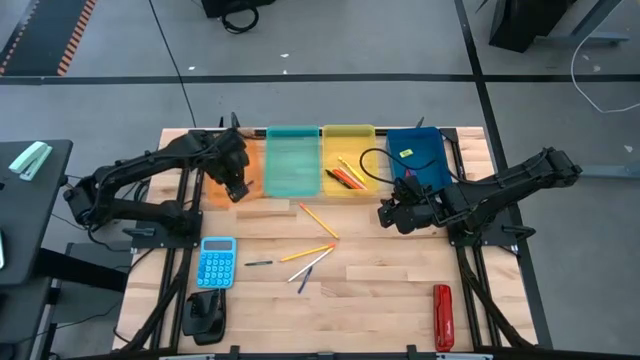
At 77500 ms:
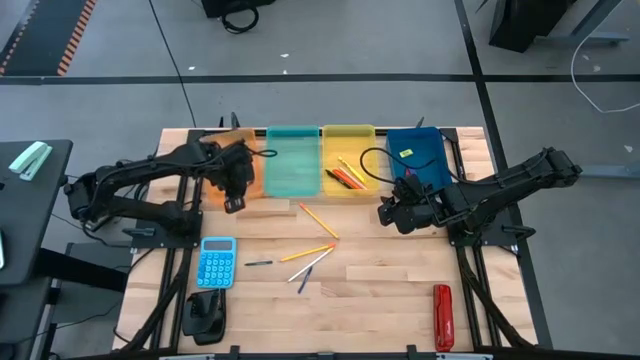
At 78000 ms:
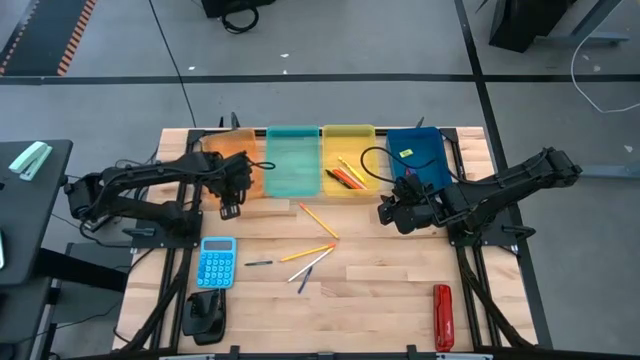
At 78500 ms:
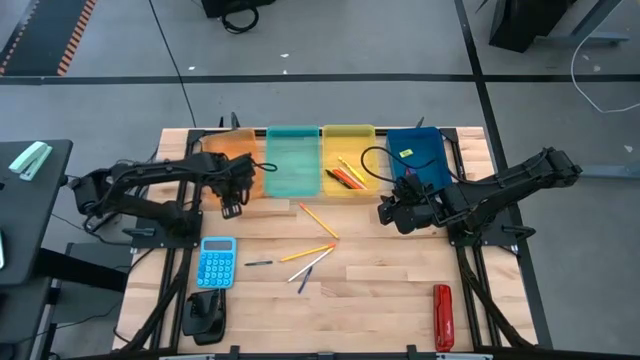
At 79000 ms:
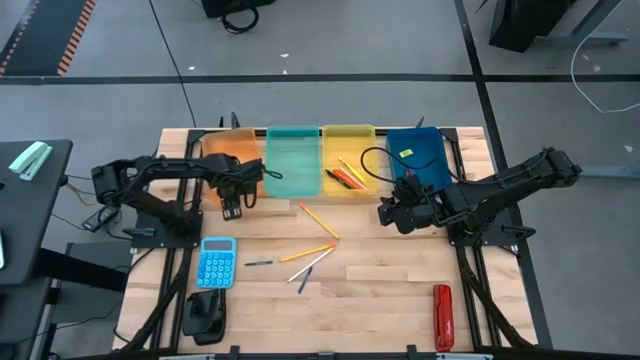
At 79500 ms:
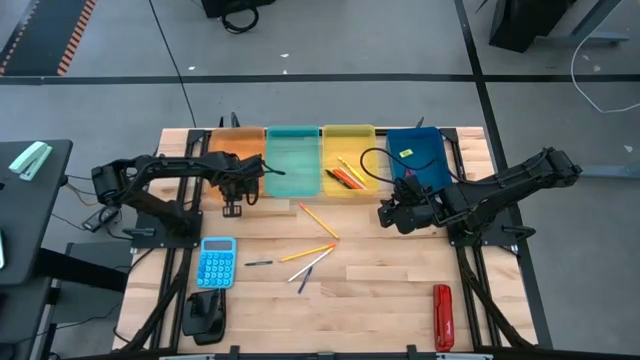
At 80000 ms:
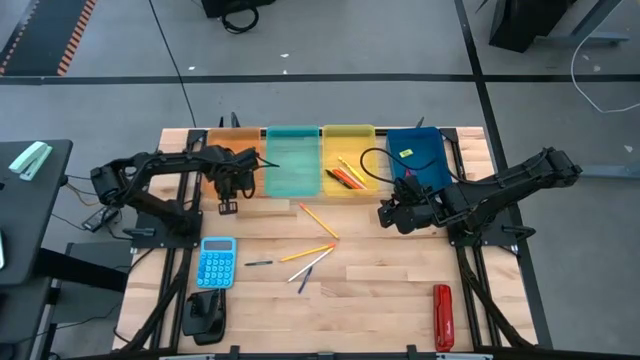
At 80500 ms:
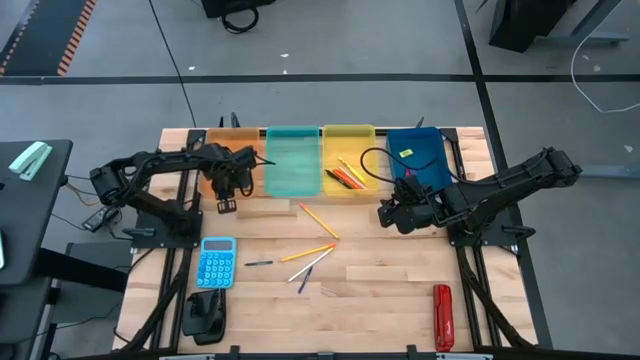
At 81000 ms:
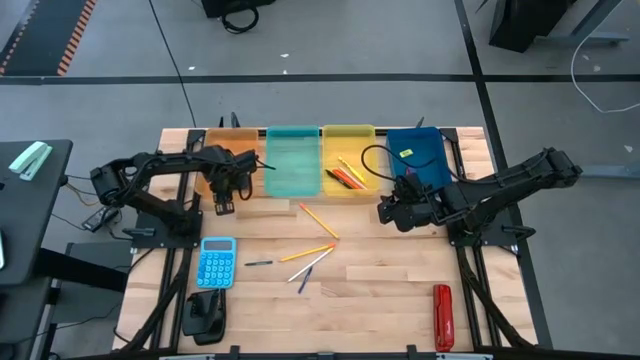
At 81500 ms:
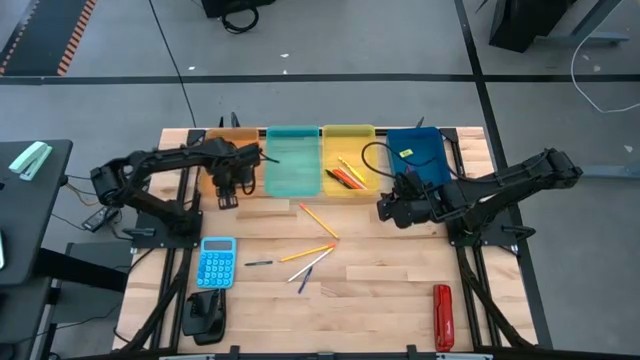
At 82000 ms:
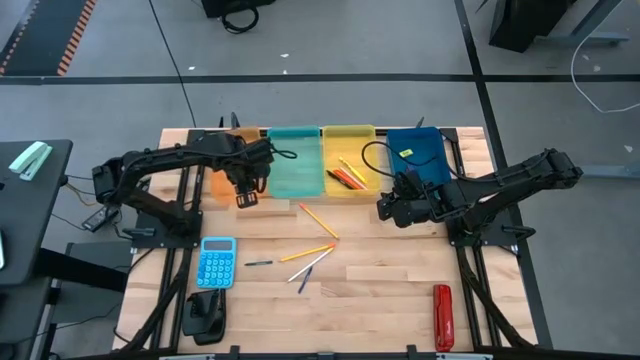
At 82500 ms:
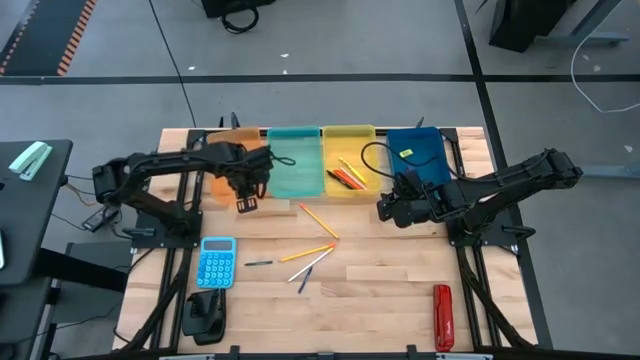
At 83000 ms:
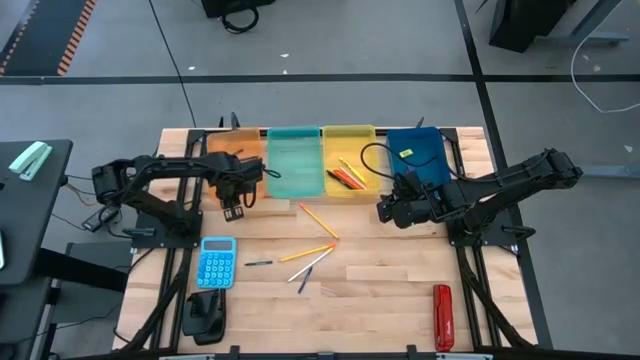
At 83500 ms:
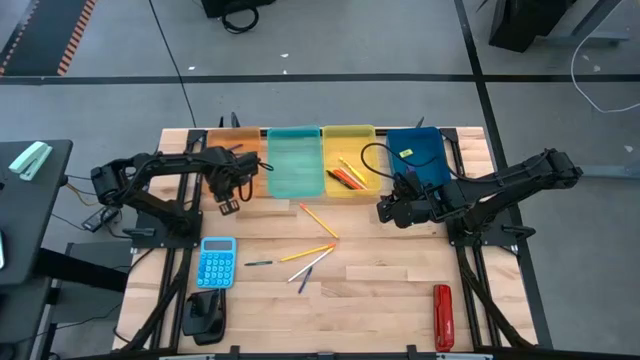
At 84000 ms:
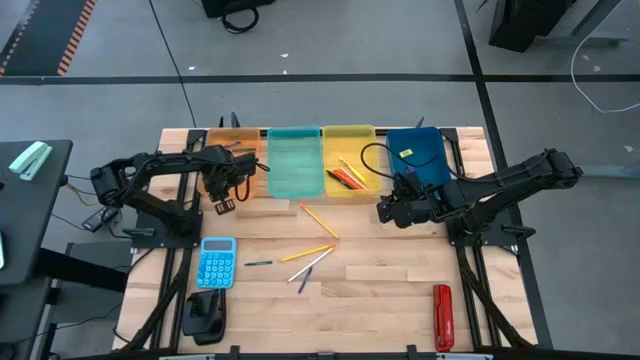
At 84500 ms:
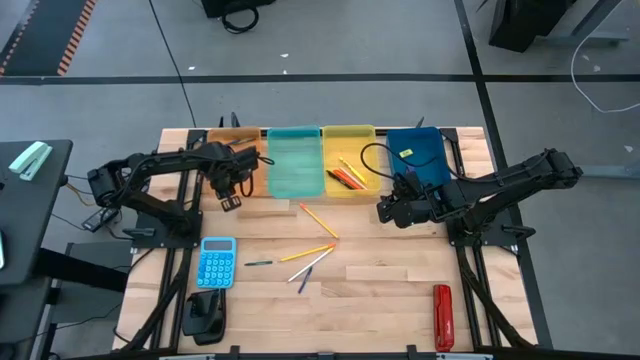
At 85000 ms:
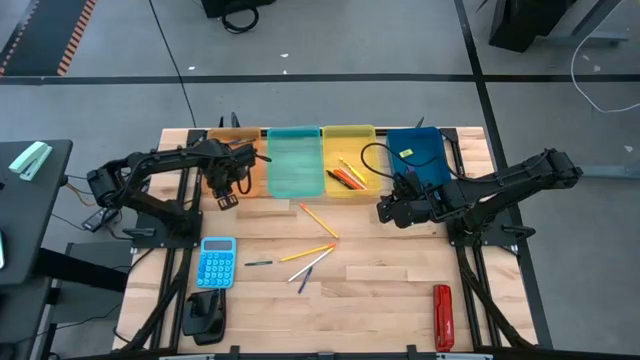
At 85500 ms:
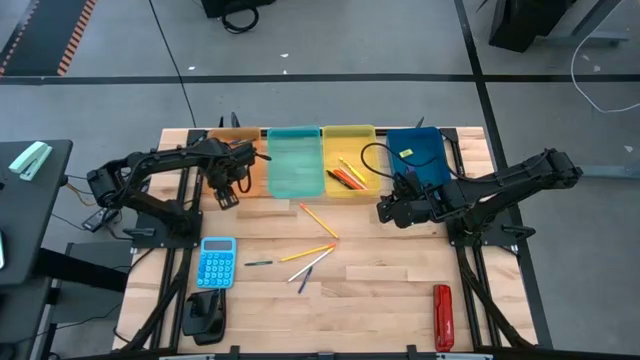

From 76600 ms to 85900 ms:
Task: Sort crayons/erasers/pens/pencils in bins
Adjust the orange bin

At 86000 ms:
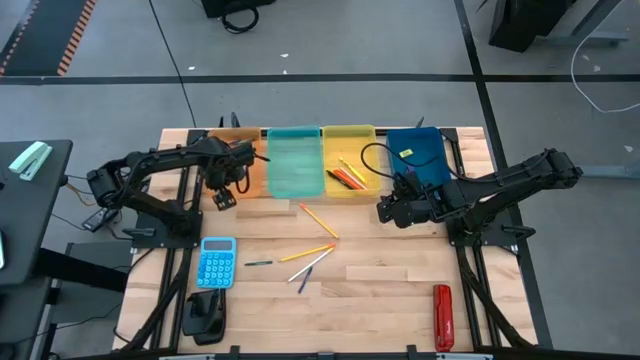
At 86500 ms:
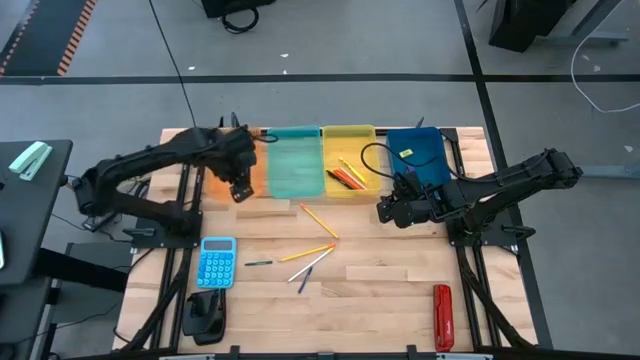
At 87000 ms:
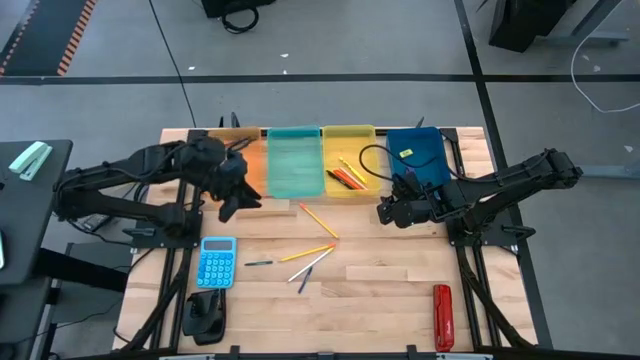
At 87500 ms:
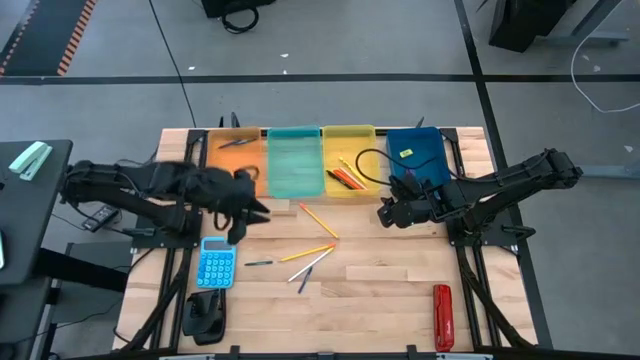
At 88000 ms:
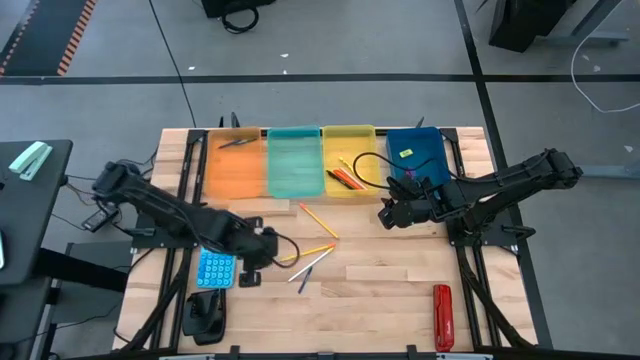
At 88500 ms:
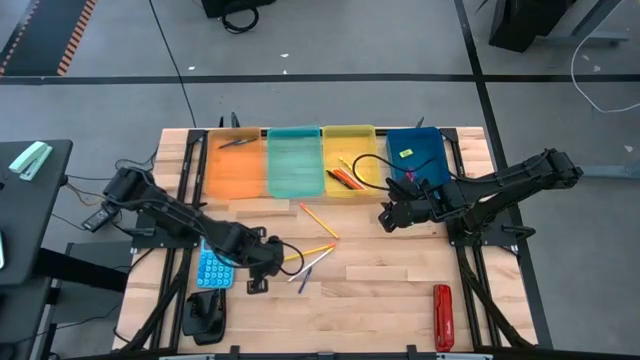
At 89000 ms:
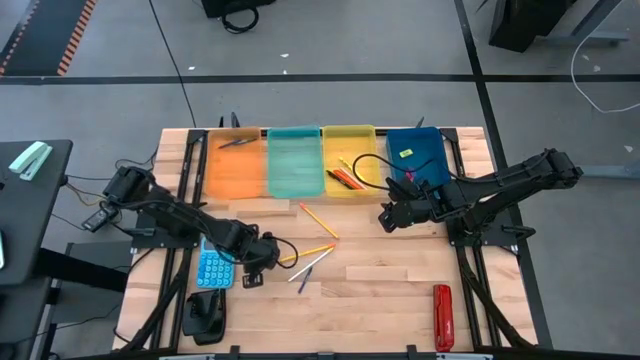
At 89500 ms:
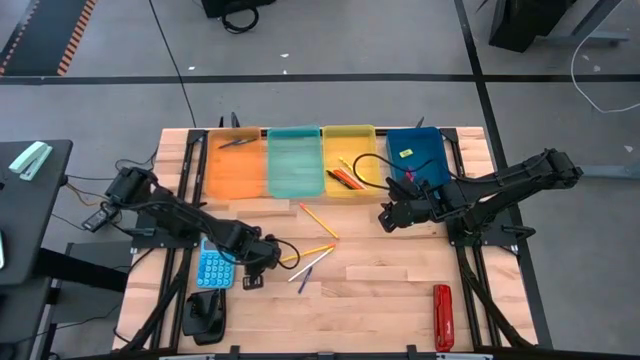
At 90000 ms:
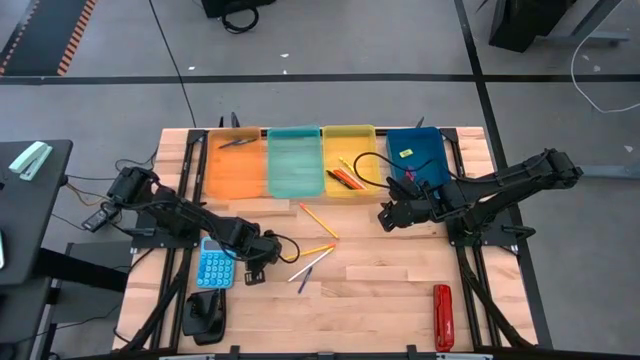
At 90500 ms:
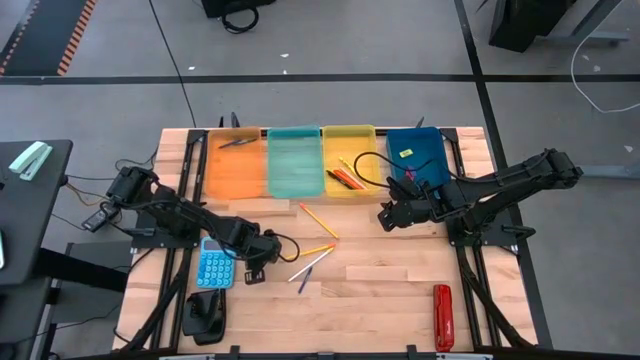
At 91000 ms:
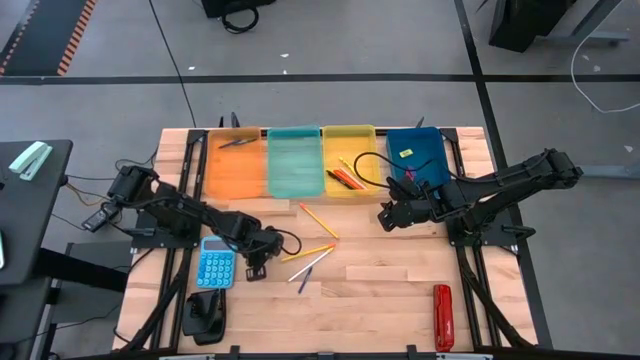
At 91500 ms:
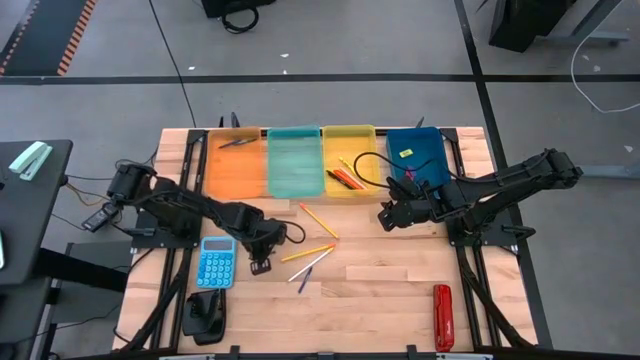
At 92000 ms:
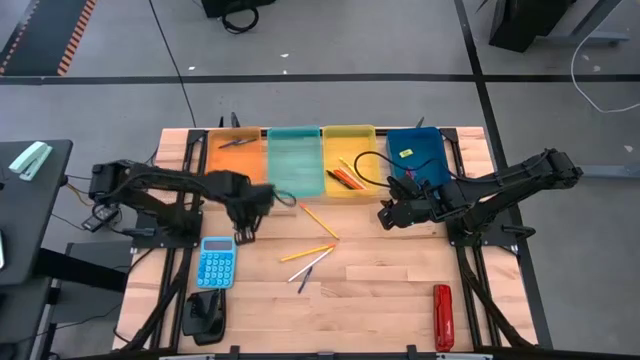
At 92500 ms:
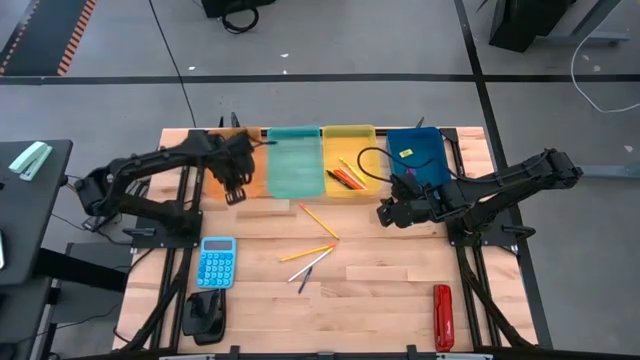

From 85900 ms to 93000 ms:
Put the dark green crayon into the orange bin

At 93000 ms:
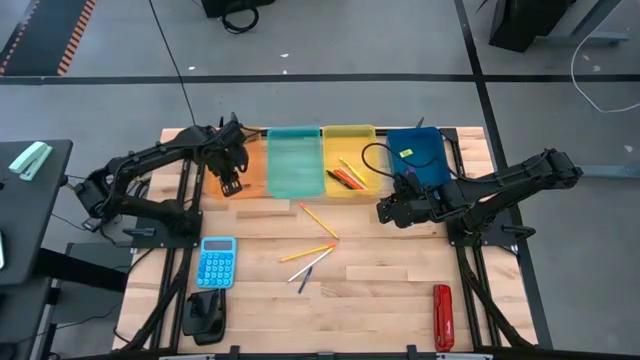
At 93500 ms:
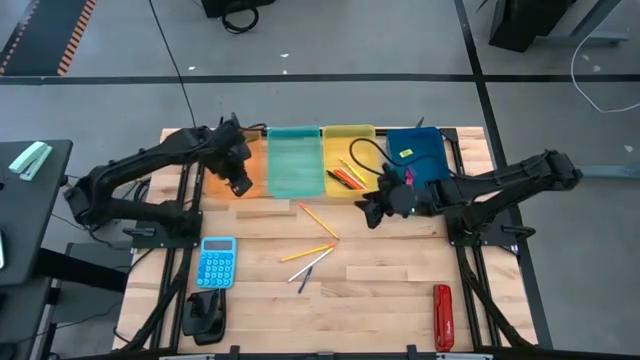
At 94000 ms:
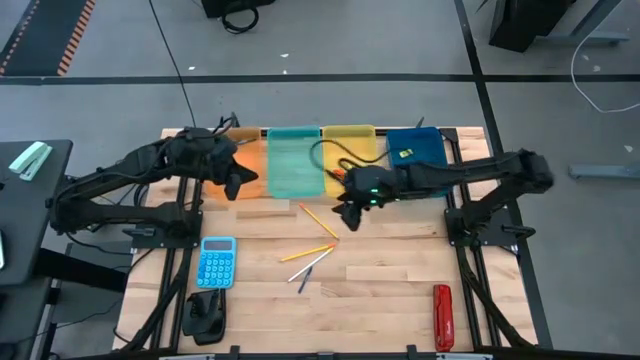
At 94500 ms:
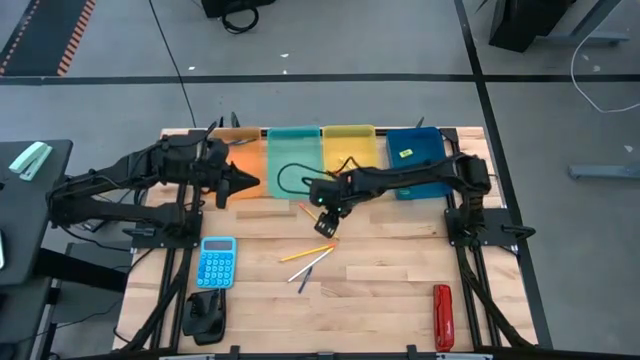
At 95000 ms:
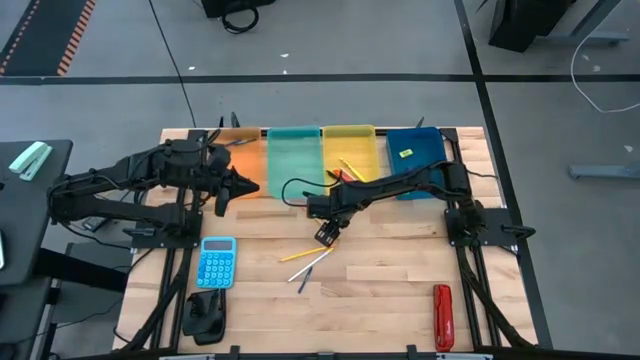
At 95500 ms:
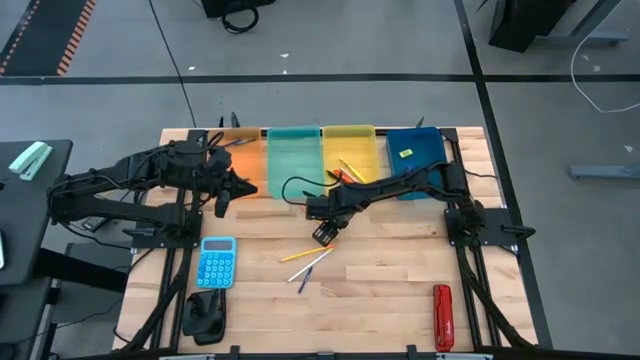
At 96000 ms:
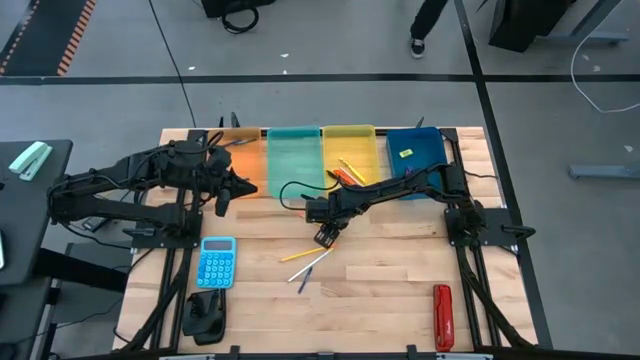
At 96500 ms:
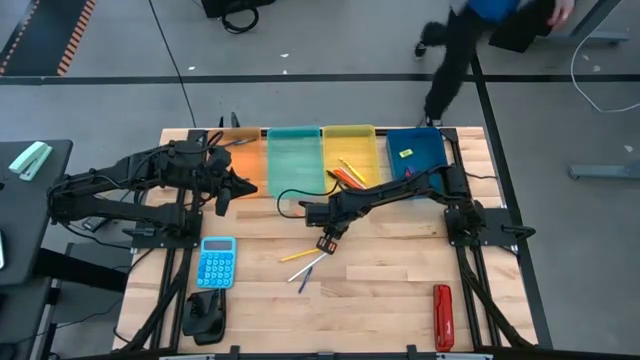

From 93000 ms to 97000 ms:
Put the yellow pencil into the green bin

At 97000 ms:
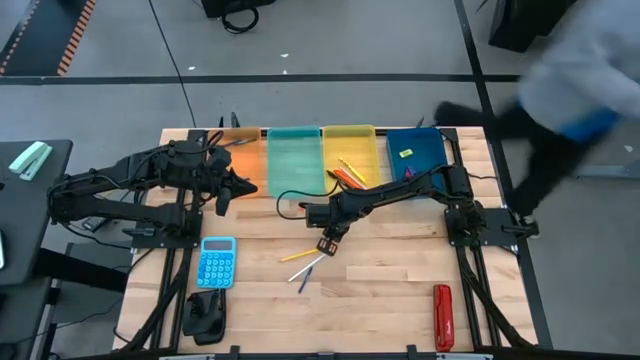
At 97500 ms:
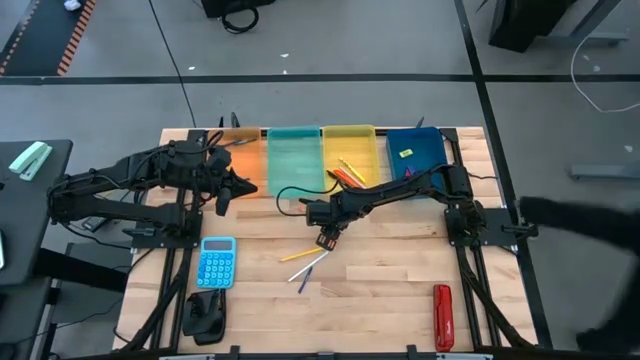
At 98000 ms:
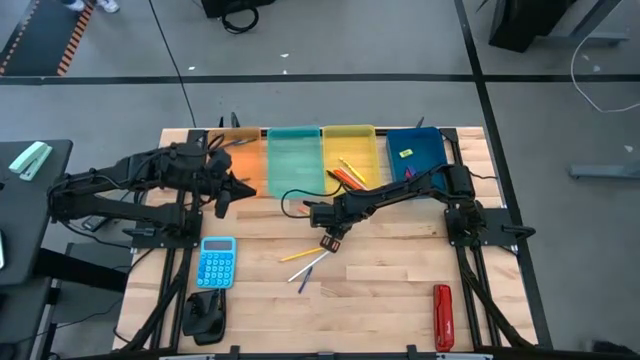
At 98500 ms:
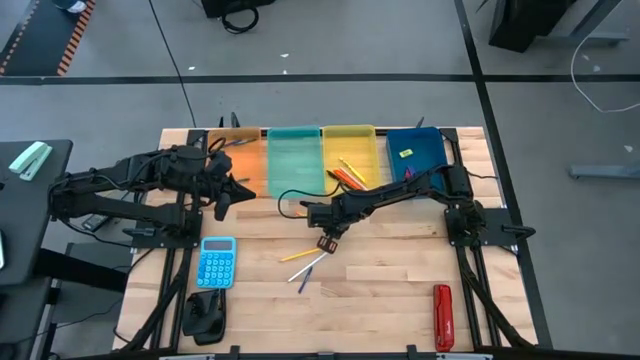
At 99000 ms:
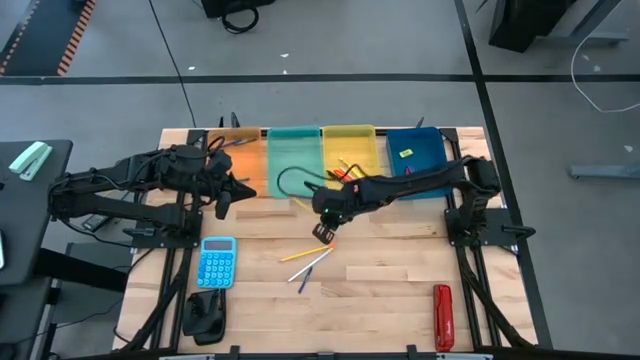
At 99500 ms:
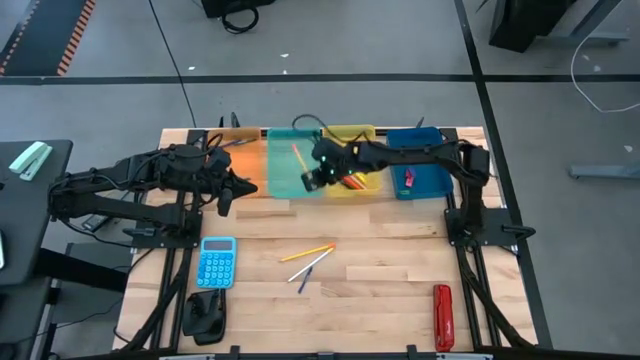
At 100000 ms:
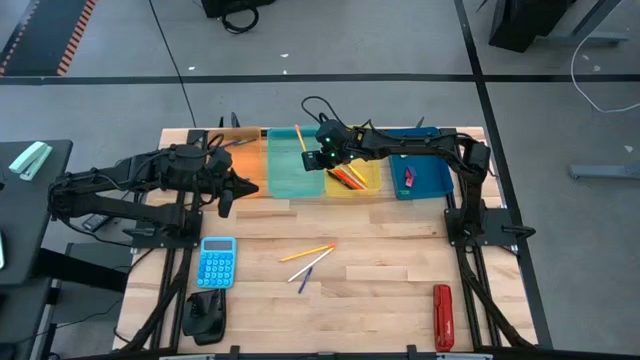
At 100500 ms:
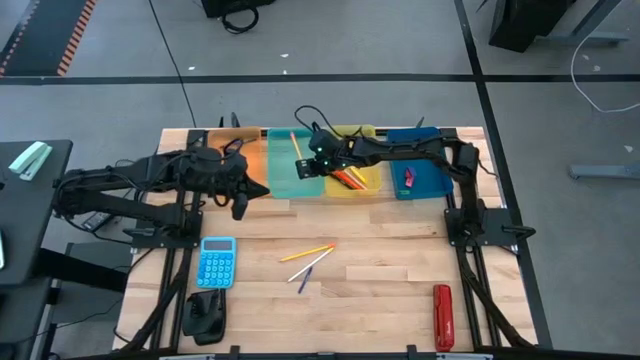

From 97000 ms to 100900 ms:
Put the yellow pencil into the green bin
